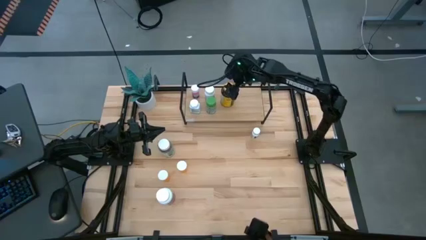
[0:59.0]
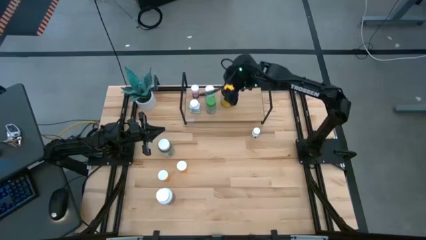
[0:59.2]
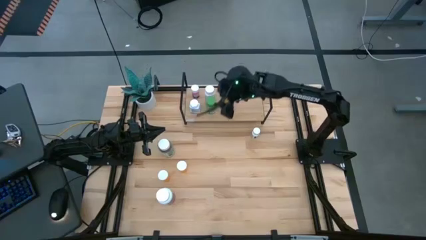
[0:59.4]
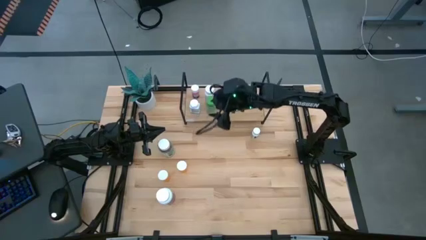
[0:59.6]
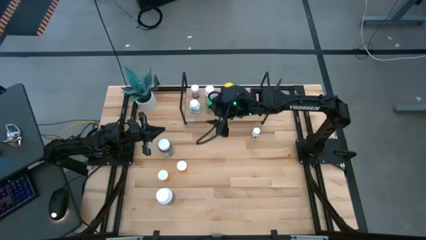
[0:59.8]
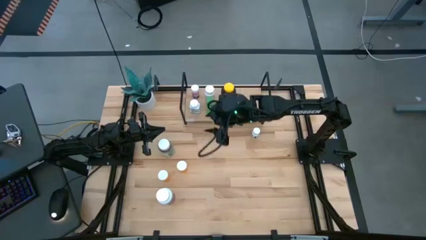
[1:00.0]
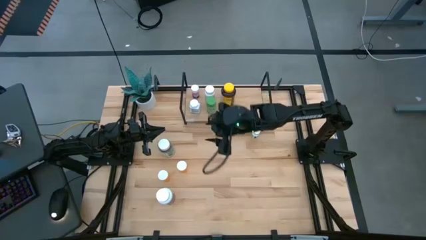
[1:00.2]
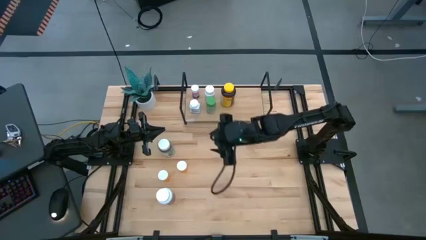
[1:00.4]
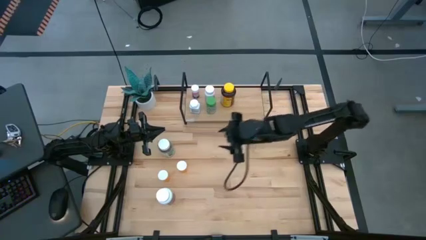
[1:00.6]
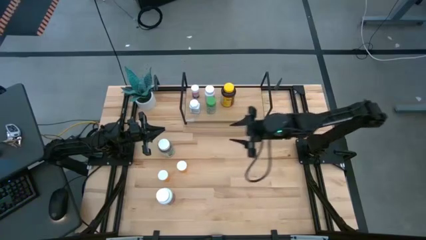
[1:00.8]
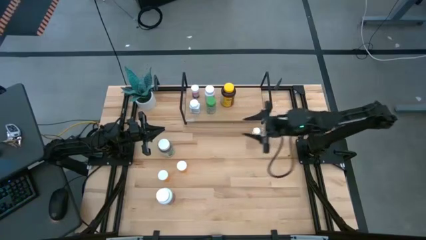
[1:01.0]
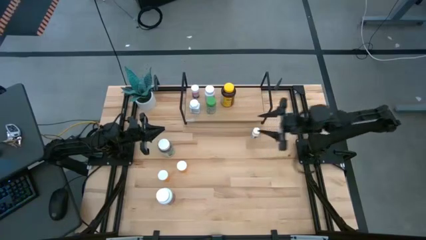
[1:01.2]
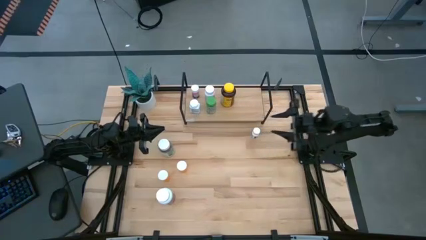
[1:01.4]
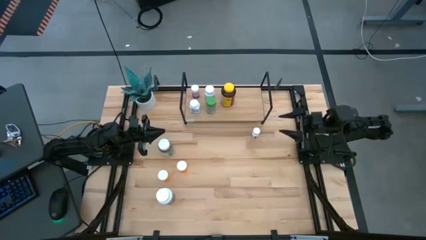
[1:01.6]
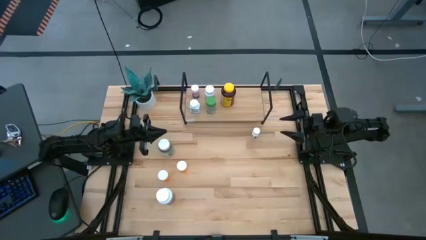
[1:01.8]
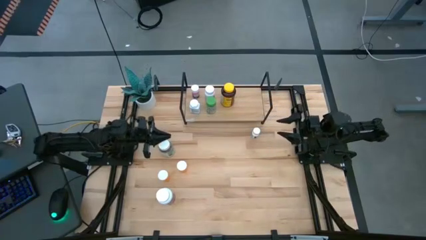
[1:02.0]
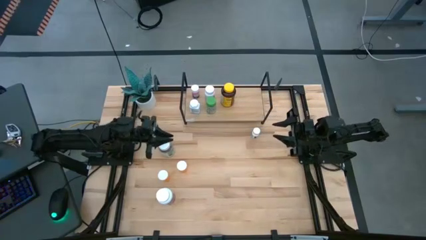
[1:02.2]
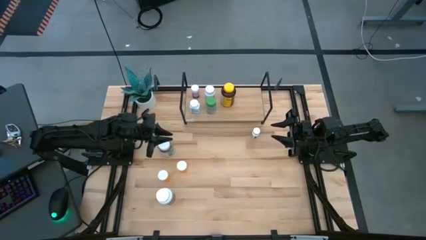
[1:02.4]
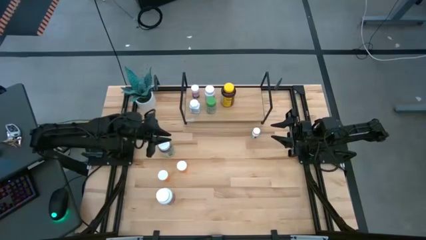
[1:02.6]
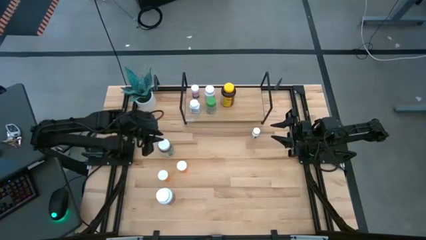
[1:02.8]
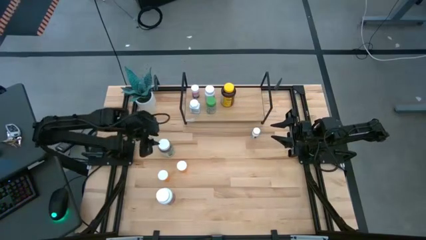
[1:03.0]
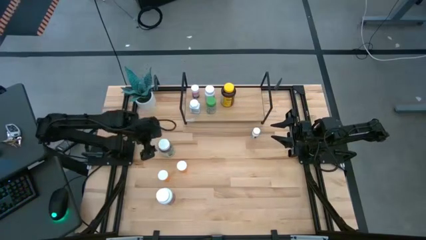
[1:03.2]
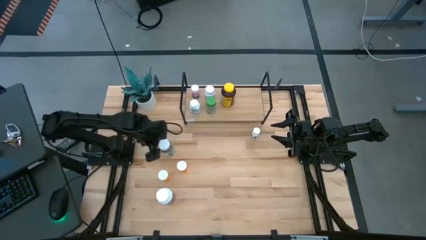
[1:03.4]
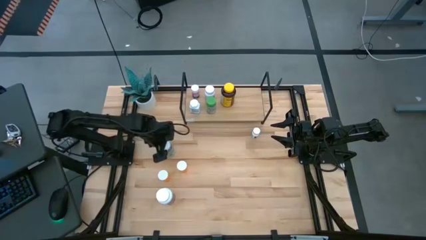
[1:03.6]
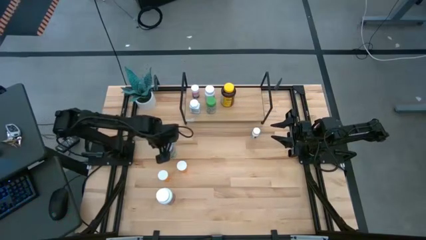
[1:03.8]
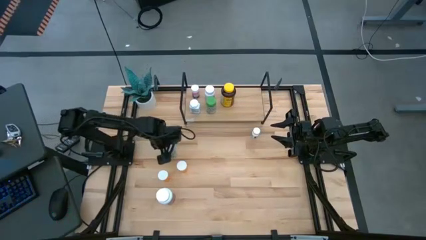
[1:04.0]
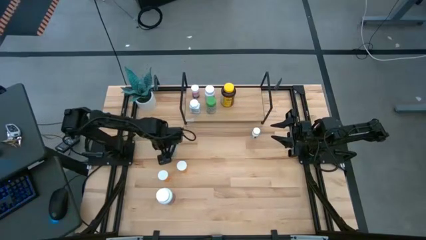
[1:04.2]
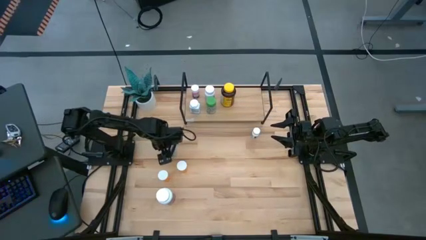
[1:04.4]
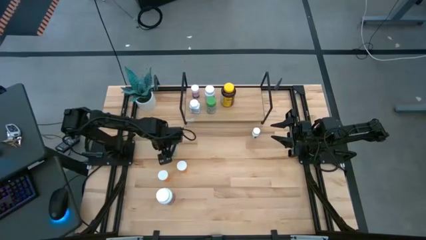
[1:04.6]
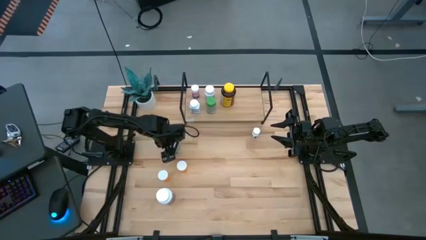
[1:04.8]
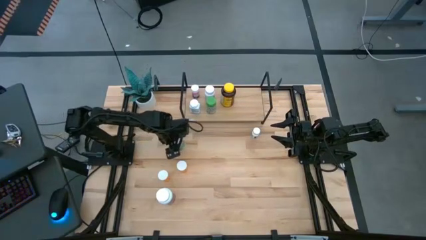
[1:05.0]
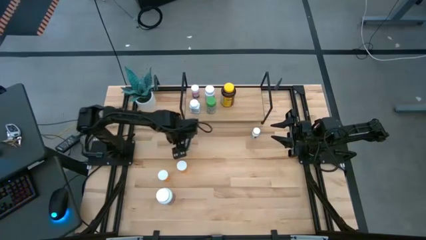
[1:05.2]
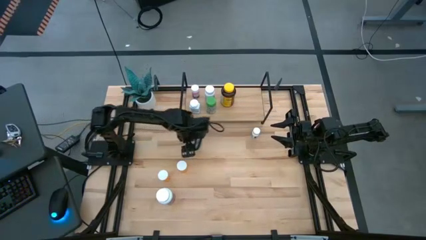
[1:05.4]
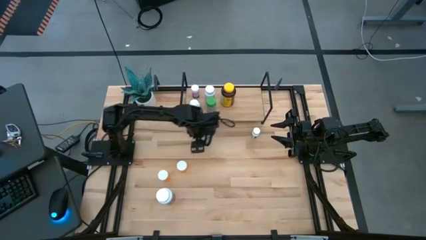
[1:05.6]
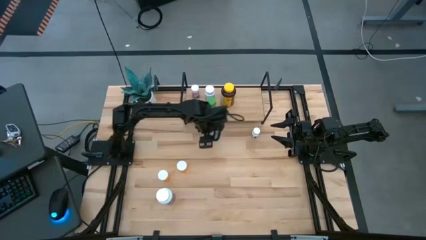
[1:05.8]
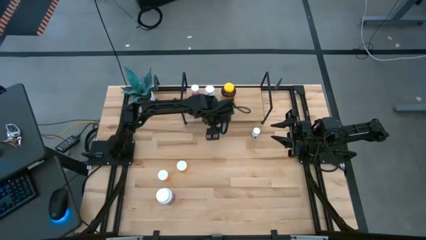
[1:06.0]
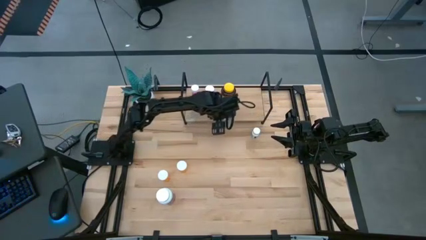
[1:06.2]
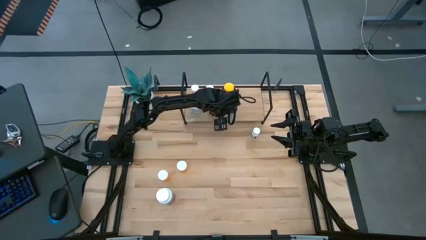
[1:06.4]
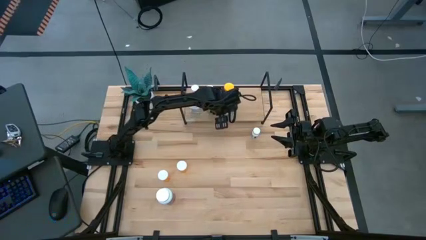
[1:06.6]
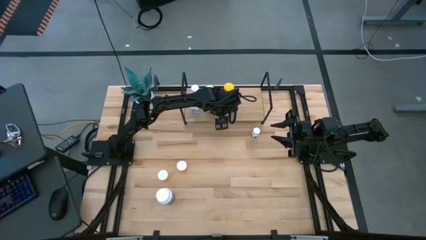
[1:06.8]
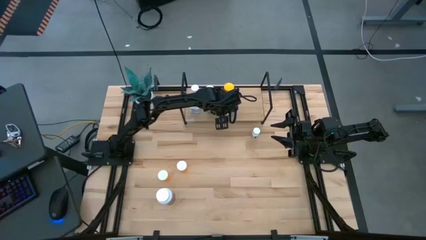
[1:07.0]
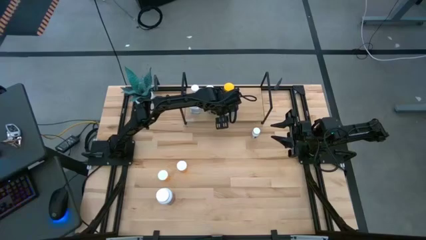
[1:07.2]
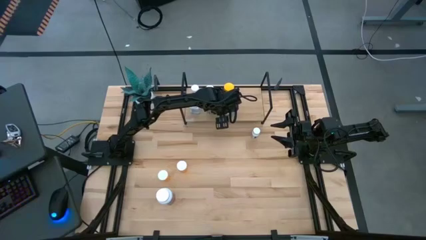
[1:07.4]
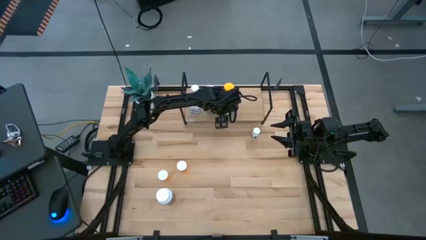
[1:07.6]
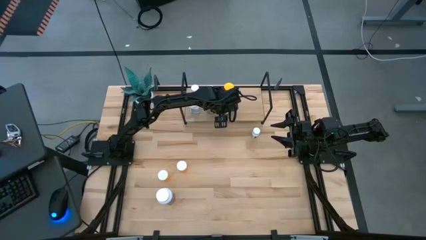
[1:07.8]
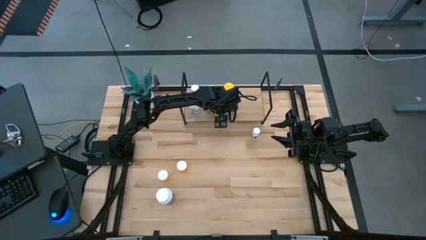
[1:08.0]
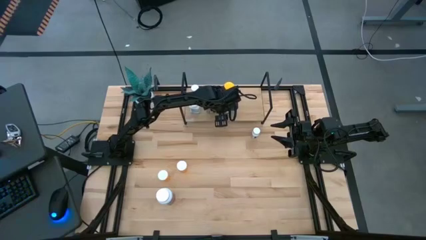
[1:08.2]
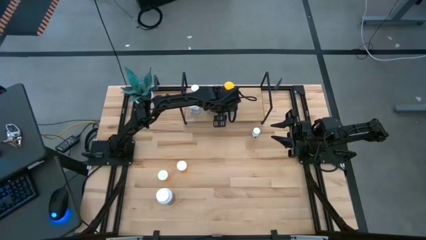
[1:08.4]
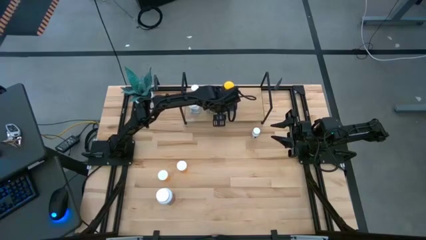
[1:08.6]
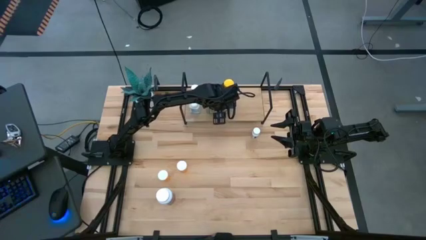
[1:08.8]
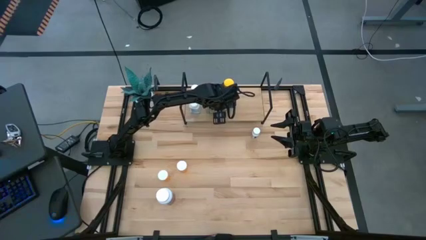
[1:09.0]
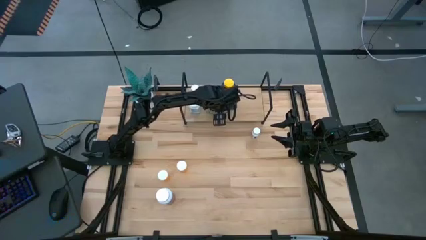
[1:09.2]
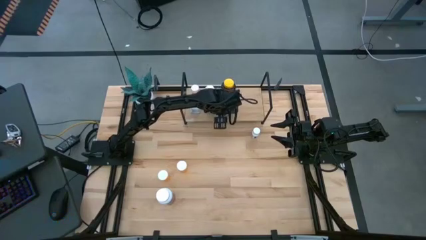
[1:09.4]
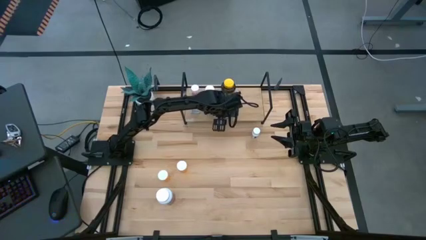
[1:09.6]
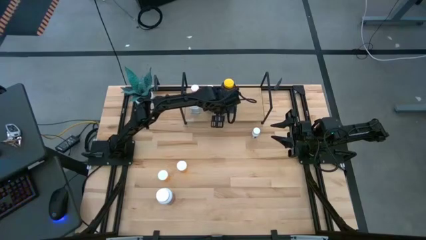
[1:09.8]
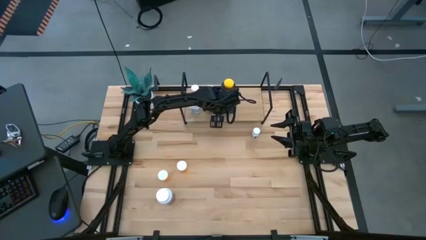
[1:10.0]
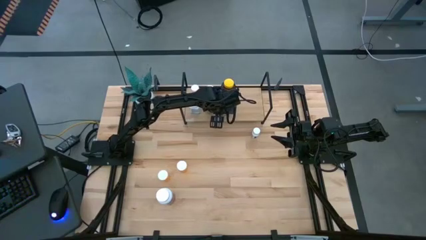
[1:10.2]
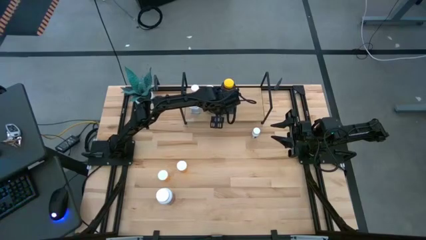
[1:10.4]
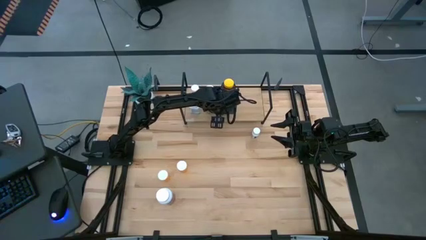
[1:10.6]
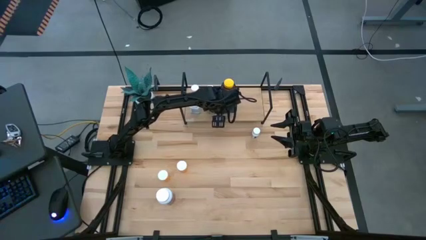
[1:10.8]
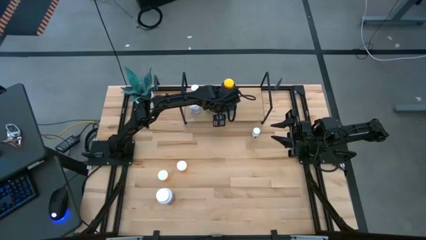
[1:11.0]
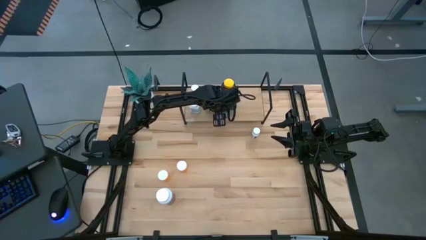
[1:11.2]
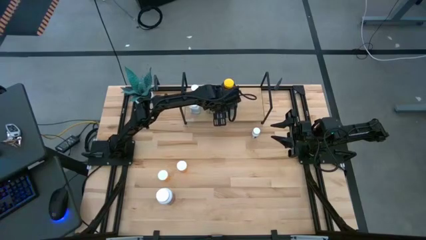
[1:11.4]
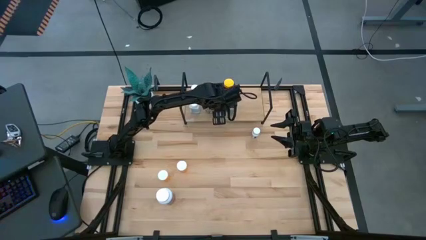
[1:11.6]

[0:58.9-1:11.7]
Task: Pick and place medicine bottles onto shelf by color
Put the green pill bottle on the shelf

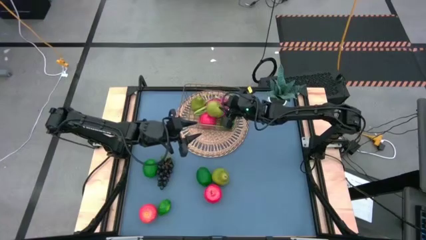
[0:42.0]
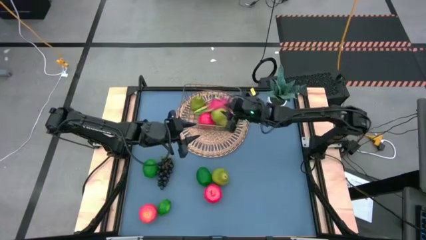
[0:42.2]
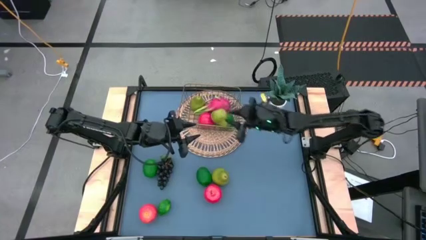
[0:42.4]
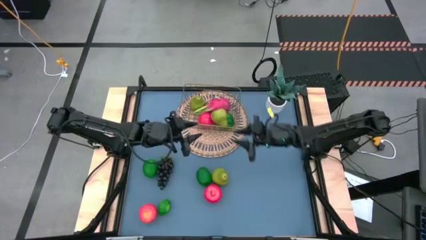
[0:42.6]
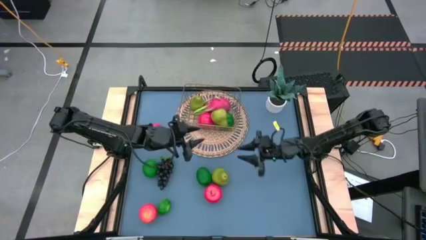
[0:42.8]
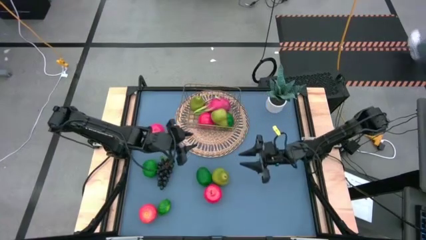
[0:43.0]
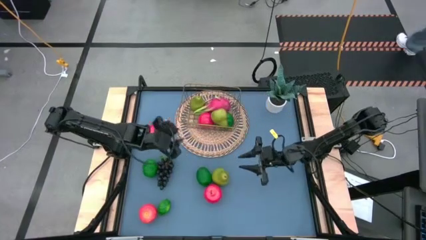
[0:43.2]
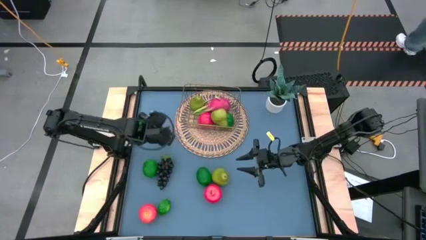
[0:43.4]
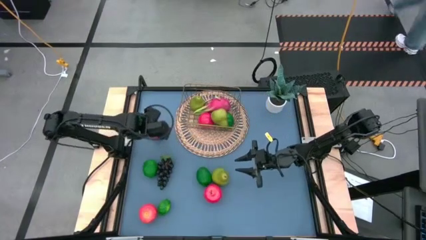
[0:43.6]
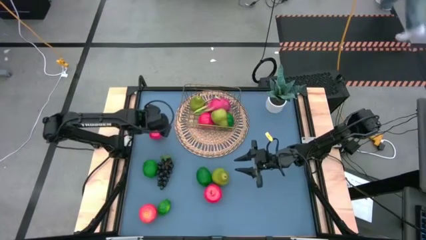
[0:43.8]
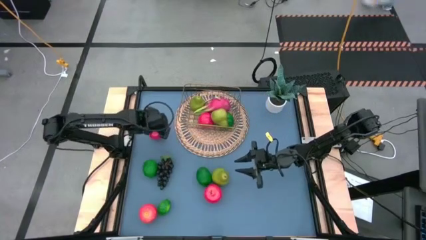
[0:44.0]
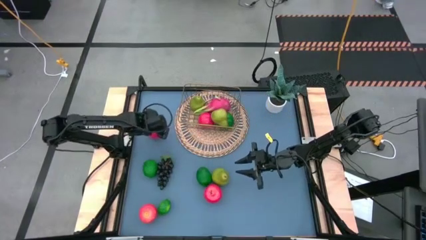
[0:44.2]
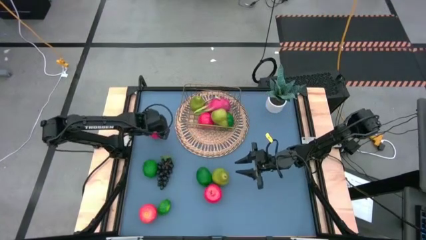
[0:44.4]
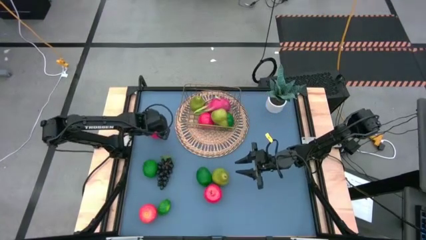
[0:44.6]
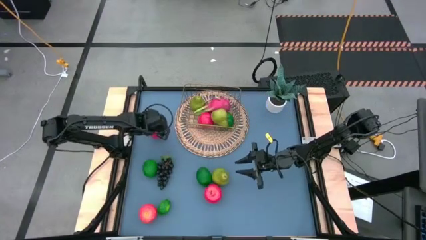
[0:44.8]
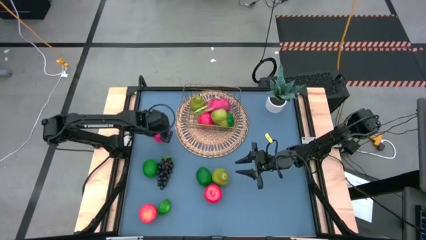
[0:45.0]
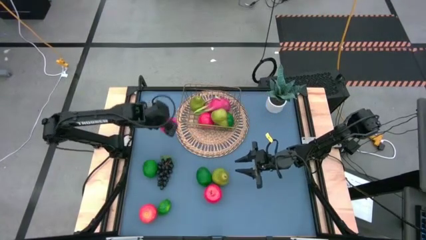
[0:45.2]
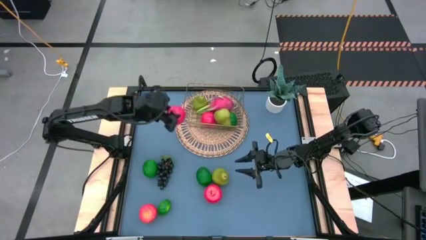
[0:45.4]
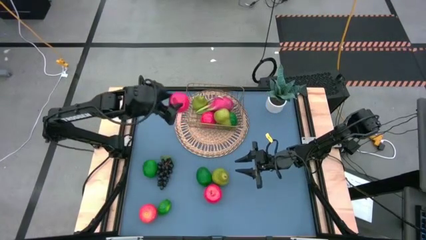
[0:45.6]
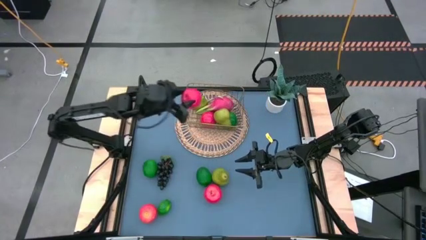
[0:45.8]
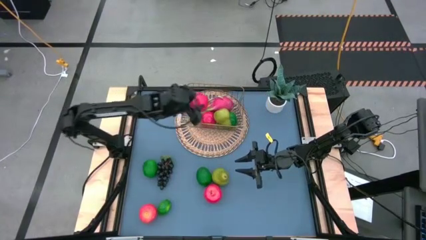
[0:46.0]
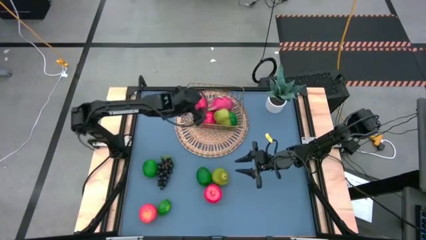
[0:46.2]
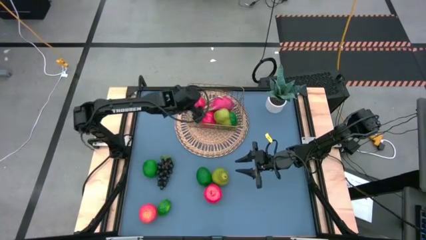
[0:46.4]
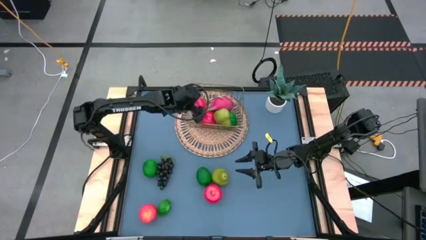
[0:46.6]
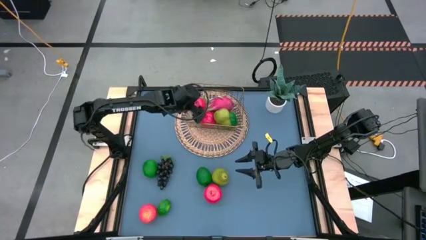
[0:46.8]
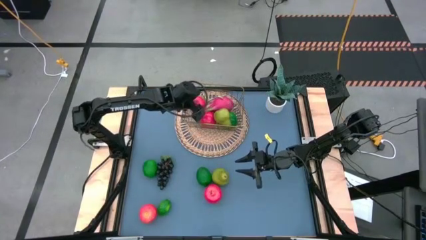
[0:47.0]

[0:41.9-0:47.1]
Task: Build produce basket
Put the red apple into the gold wire basket
